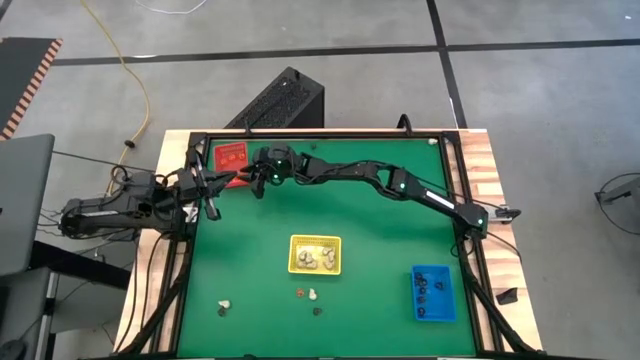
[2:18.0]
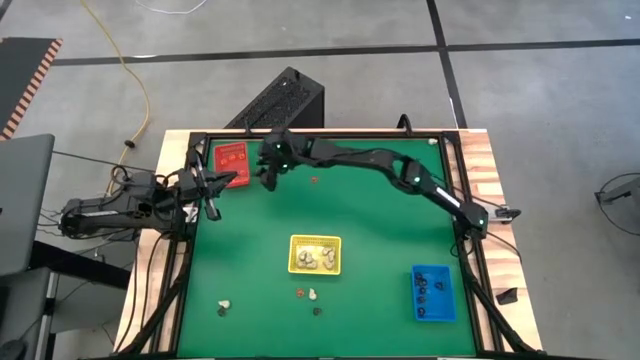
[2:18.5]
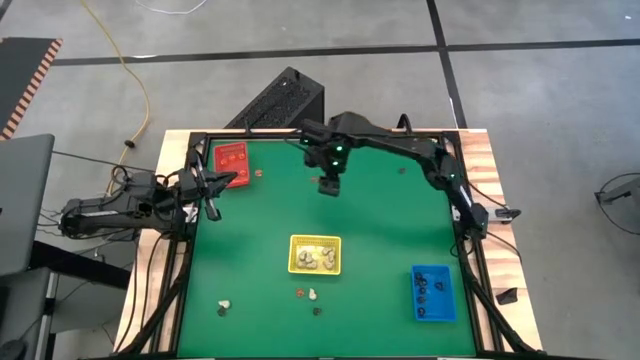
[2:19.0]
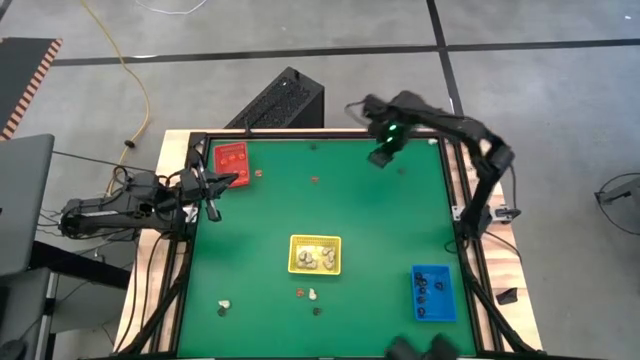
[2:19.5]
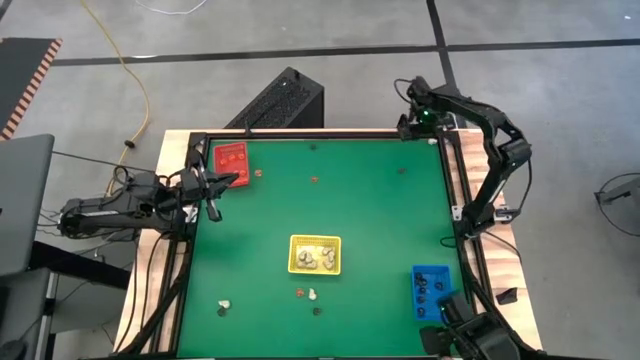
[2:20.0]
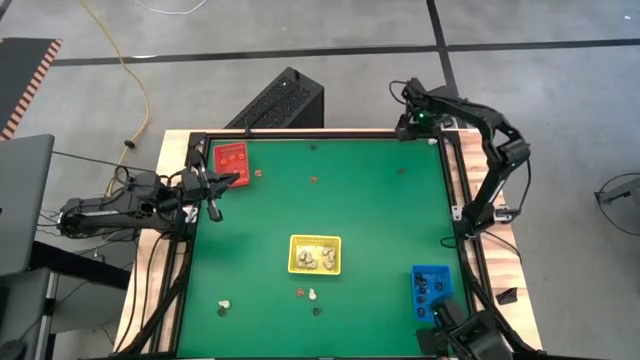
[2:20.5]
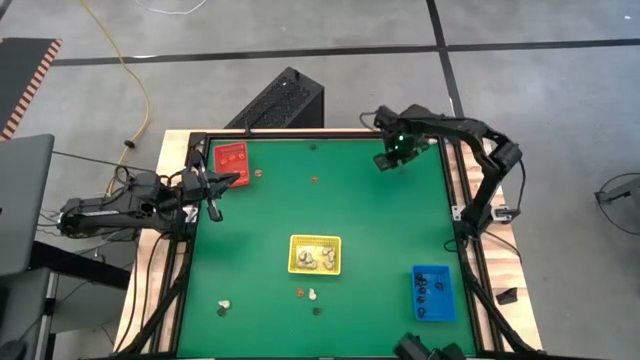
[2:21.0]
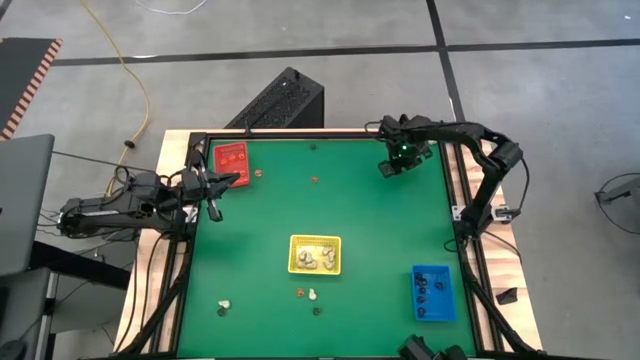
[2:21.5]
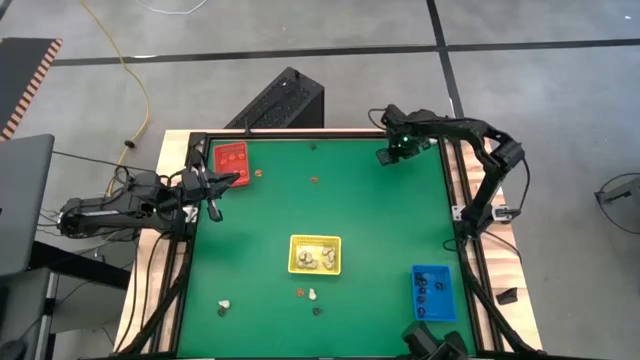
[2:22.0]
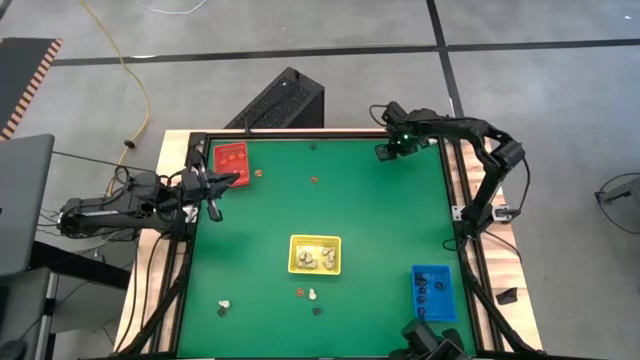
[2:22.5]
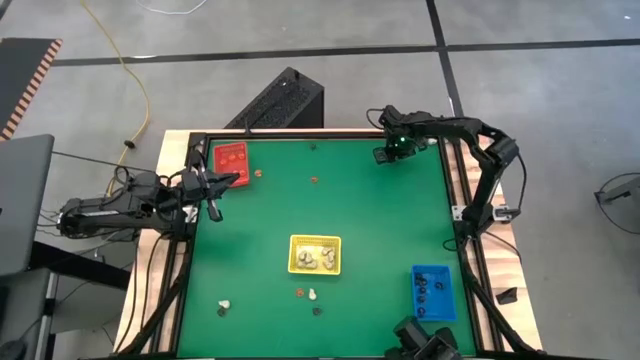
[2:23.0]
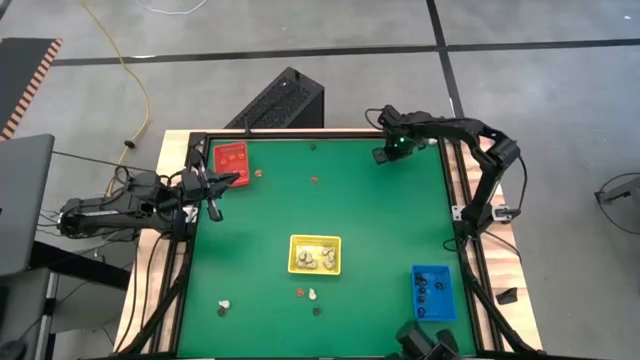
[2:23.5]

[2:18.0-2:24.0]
Task: Sort Halloween decoration
Put the black skull toy into the blue bin

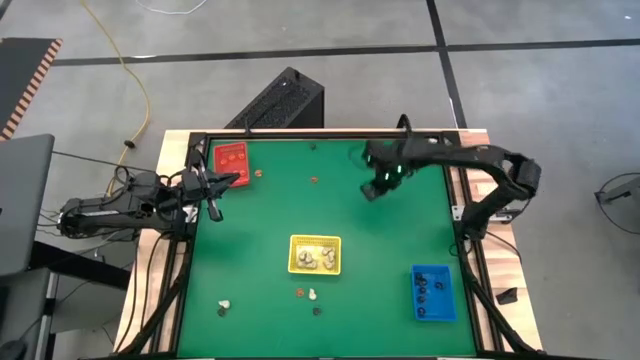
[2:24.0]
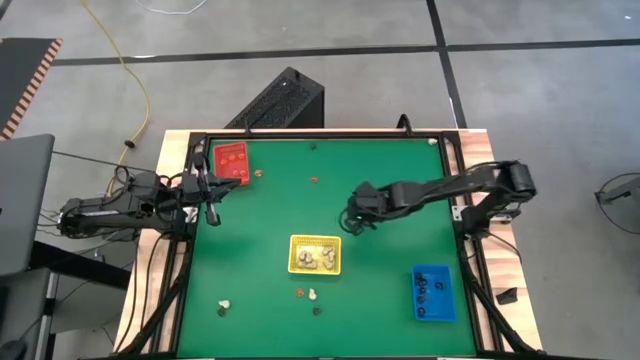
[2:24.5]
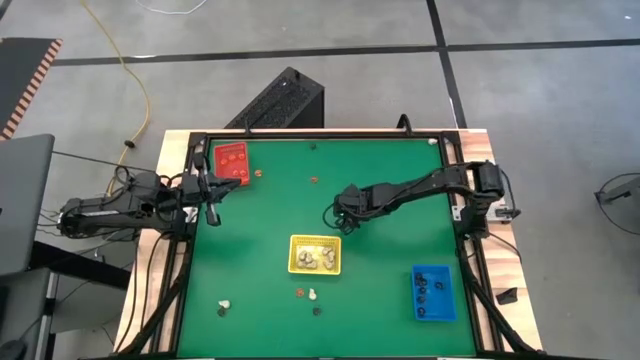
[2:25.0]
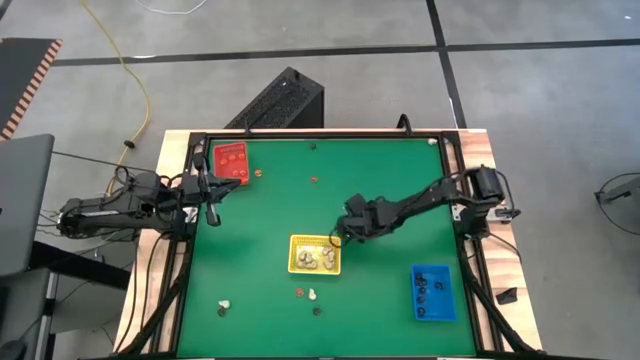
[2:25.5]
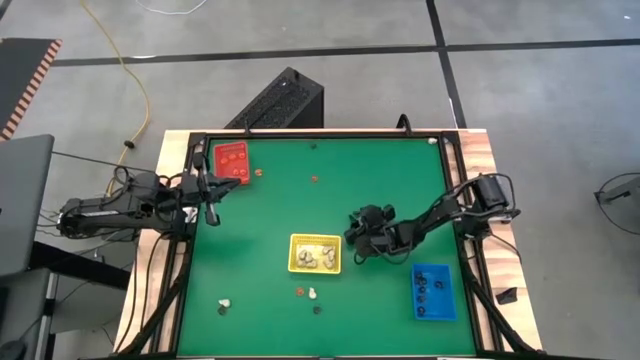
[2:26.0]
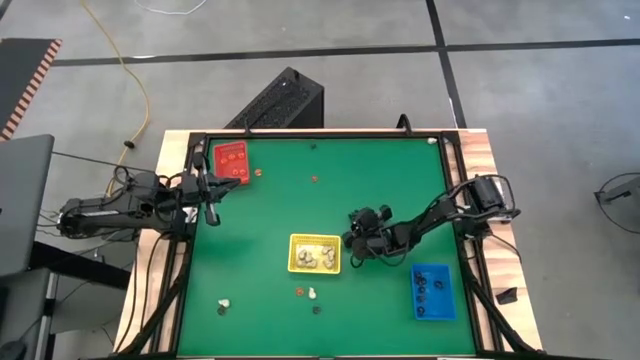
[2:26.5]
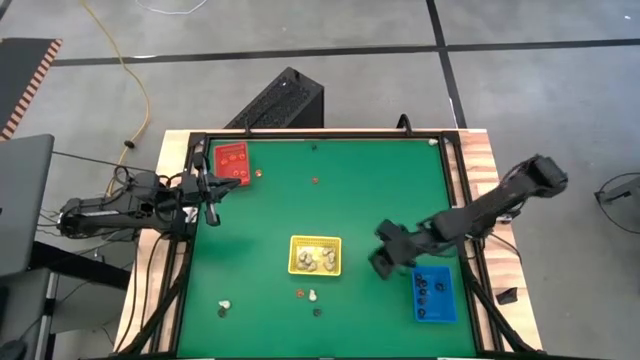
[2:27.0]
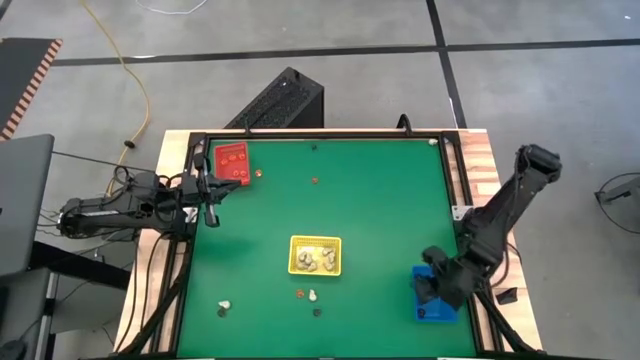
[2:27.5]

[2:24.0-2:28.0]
Put the black skull toy into the blue bin

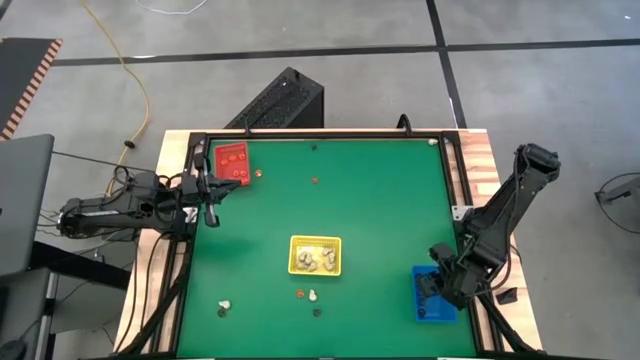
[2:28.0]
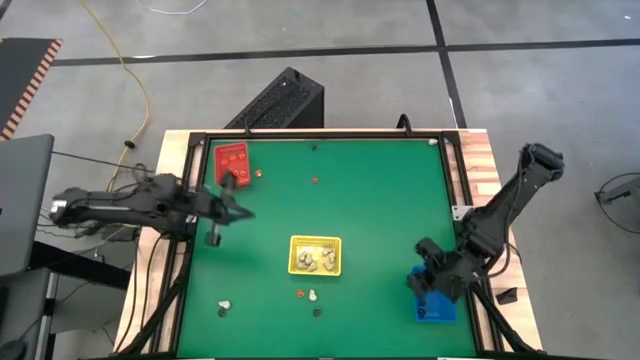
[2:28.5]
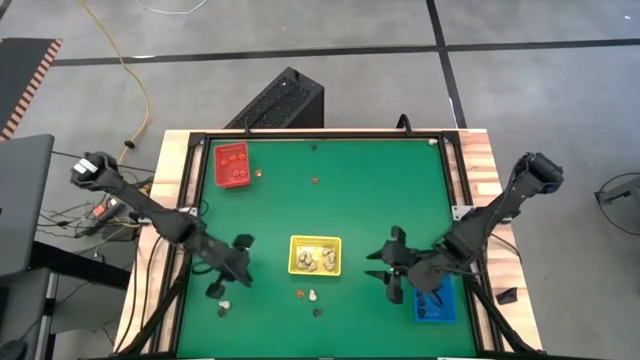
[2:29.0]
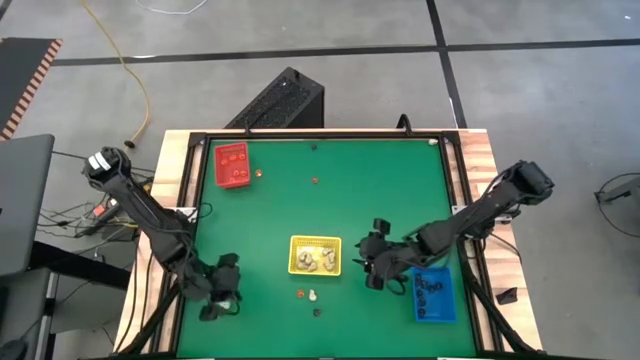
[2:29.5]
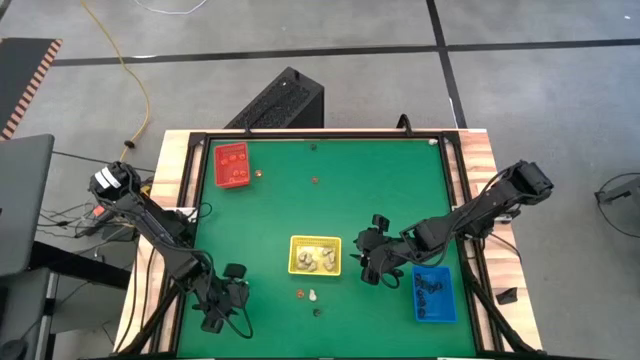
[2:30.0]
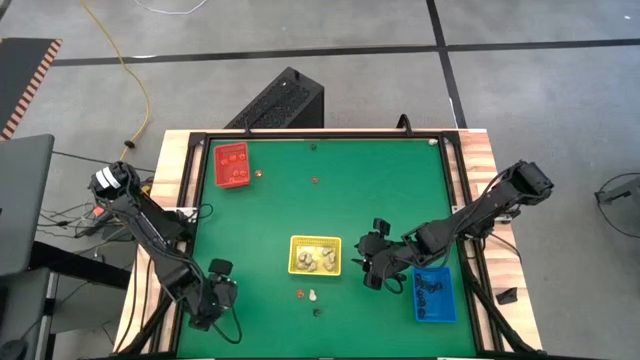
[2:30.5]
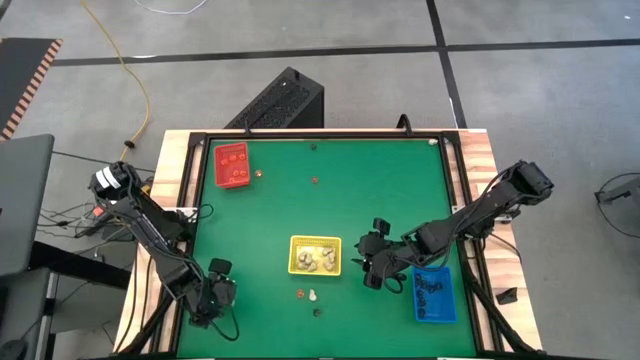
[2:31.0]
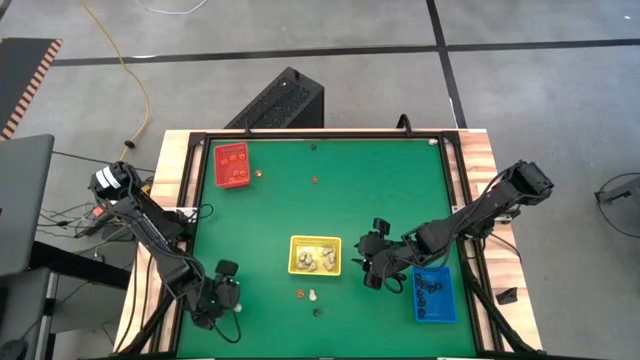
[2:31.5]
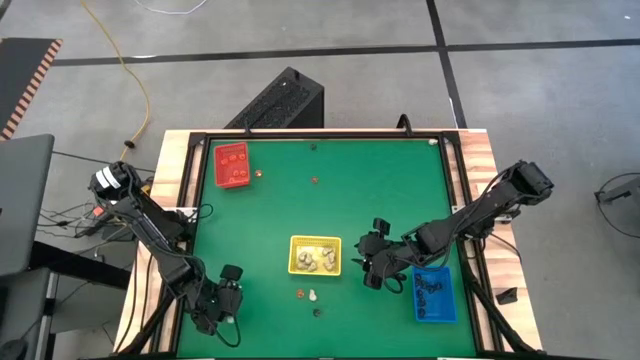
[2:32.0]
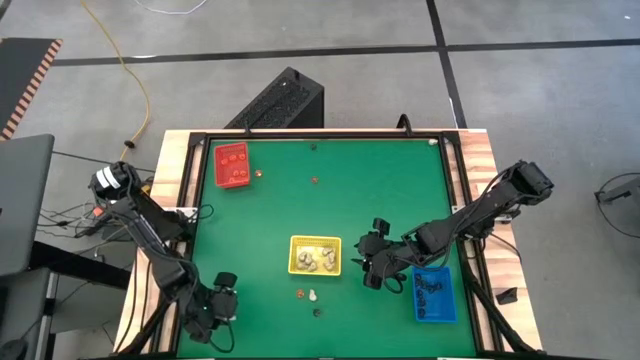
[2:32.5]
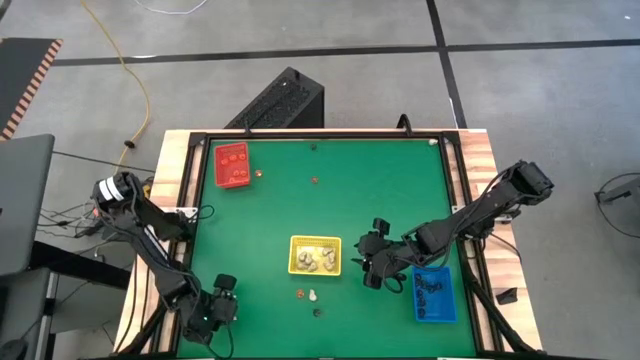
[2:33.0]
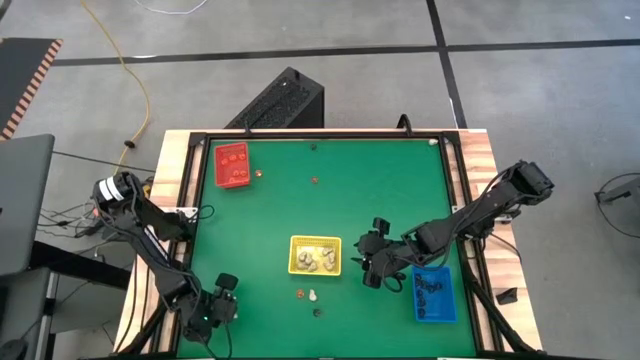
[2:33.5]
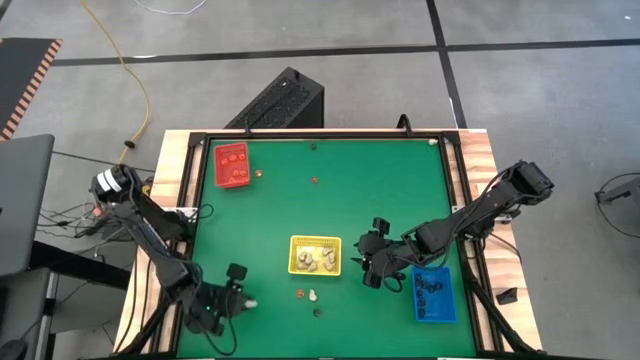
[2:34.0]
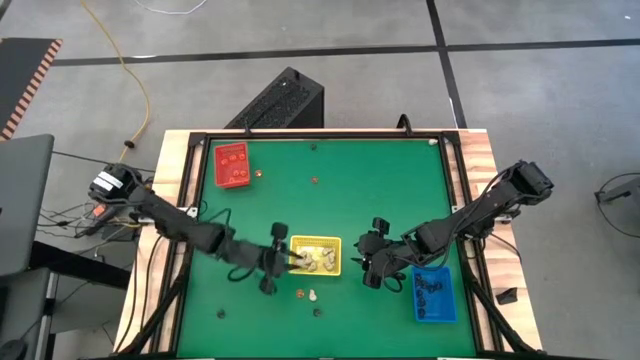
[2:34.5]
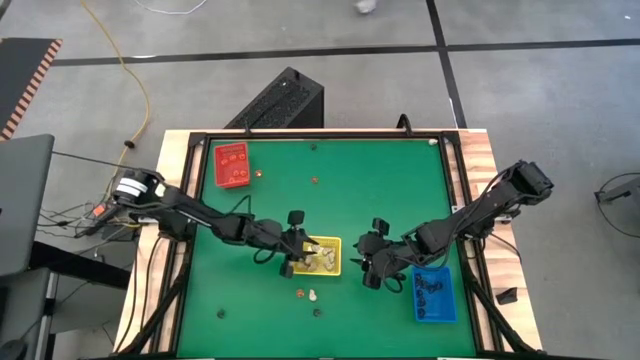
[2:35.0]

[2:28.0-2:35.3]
Put the white skull toy into the yellow bin

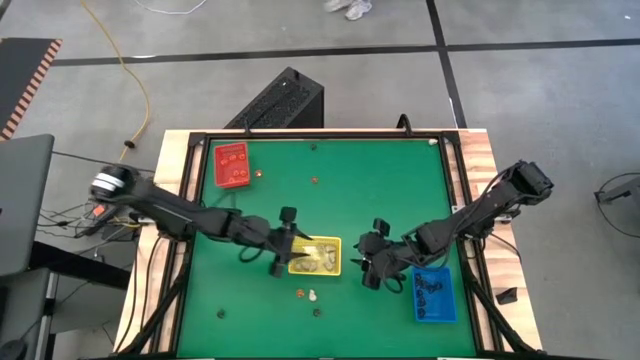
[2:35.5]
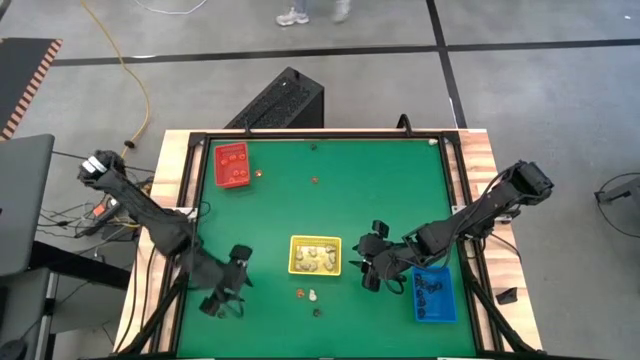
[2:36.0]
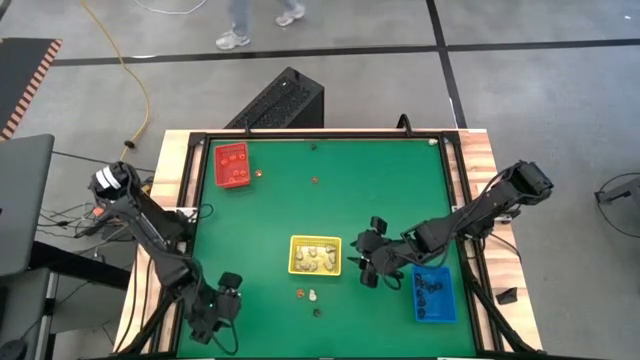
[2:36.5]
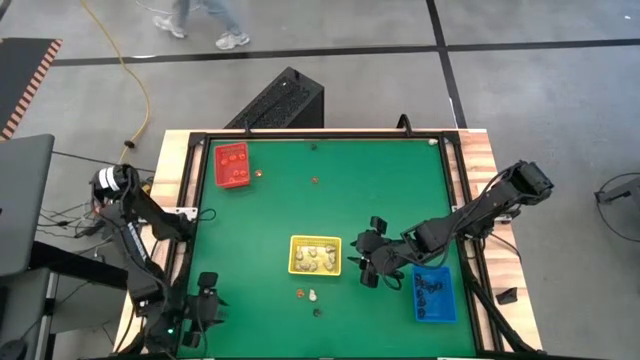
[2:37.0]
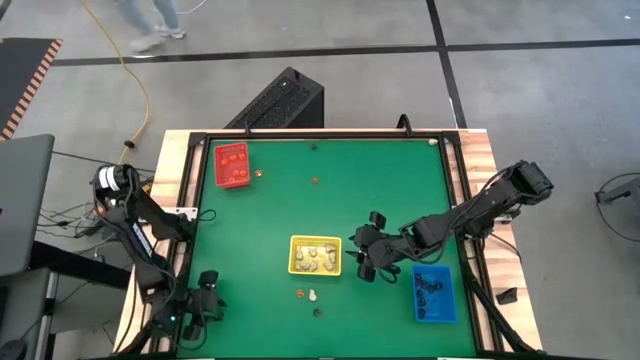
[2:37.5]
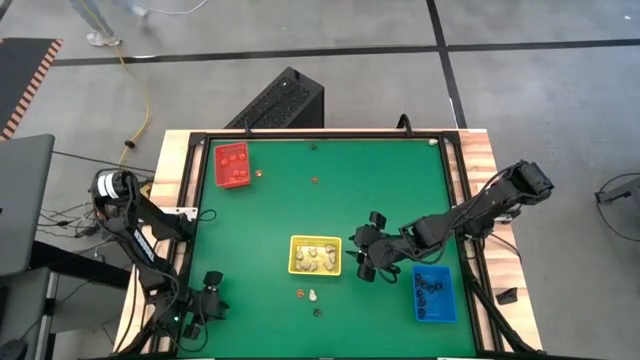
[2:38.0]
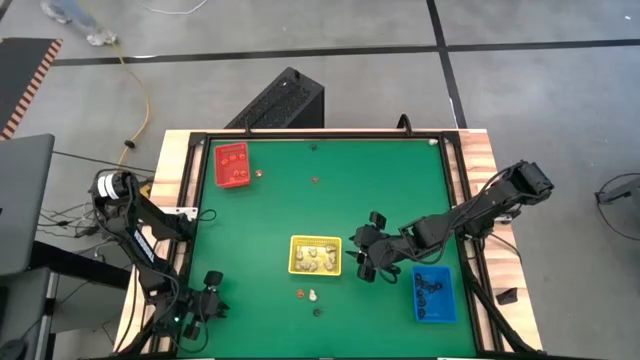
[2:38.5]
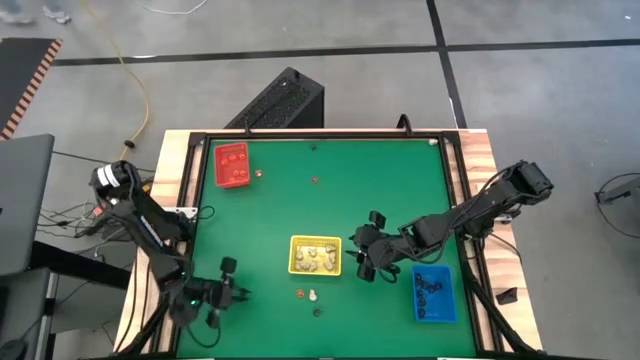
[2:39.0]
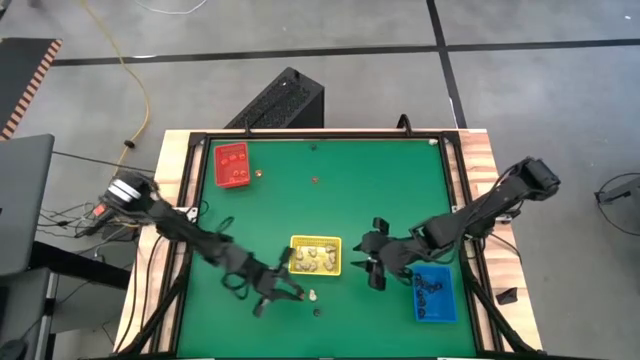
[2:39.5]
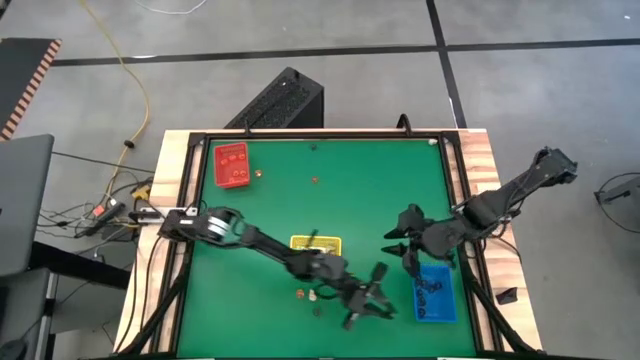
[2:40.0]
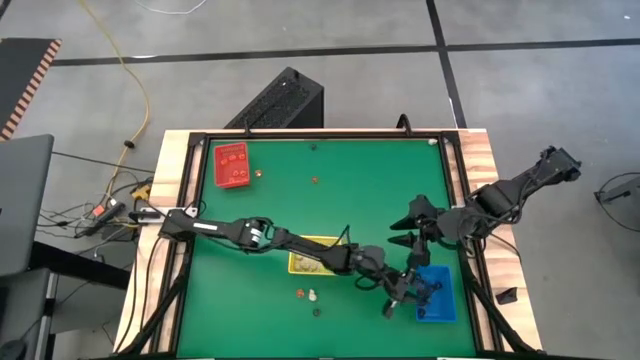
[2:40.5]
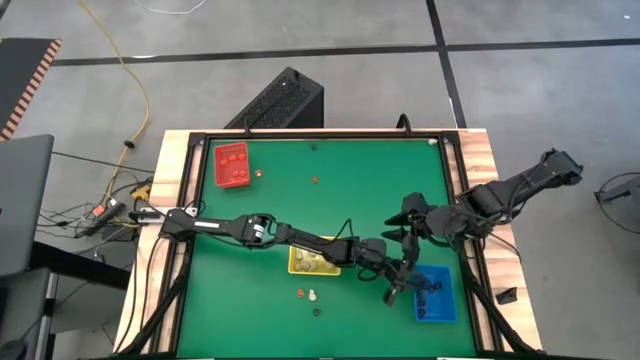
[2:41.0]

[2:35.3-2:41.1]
Put the black skull toy into the blue bin
